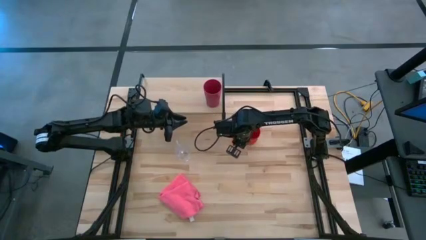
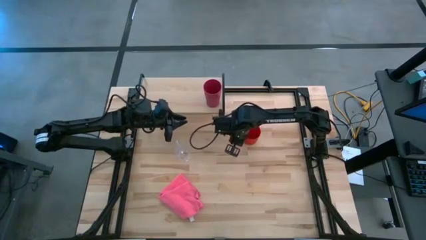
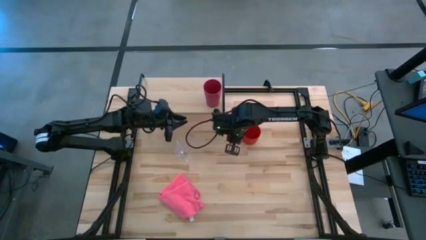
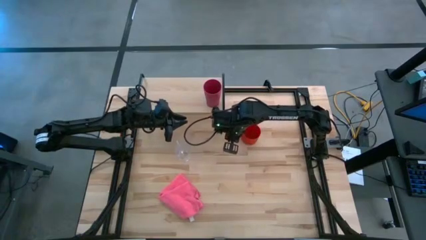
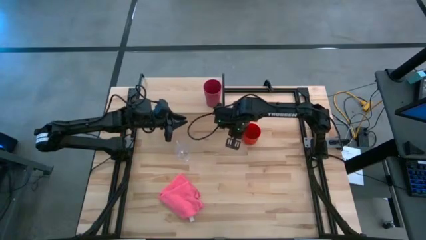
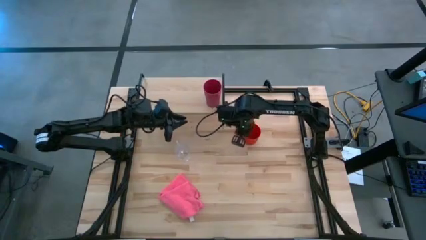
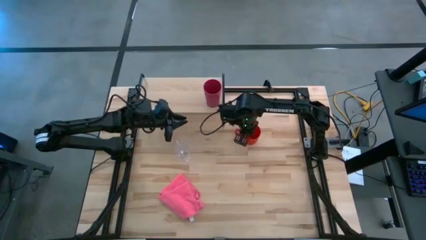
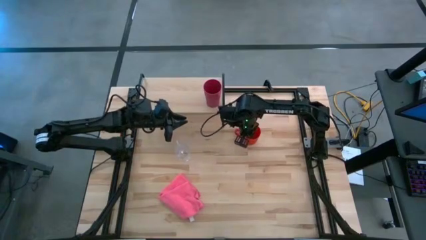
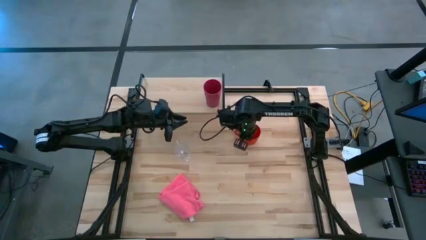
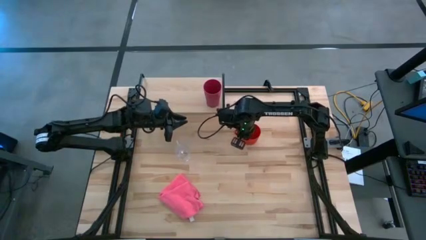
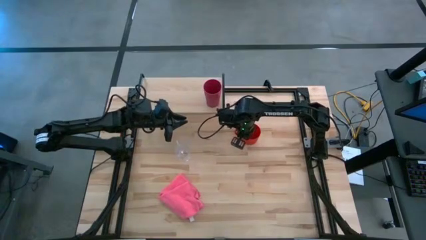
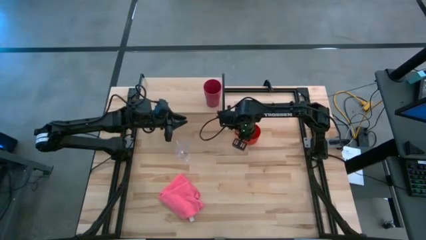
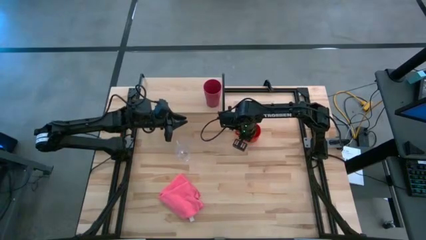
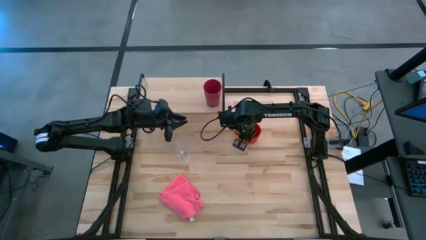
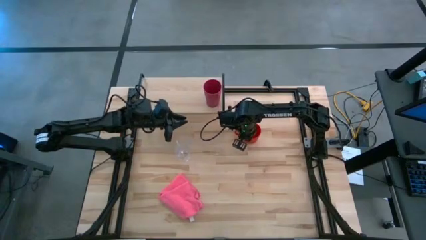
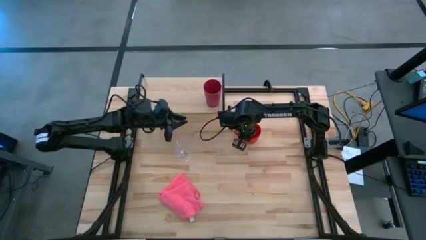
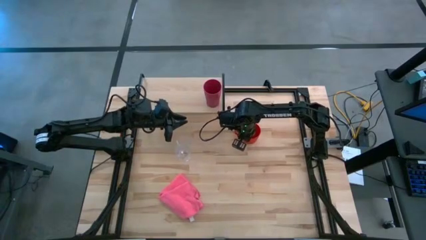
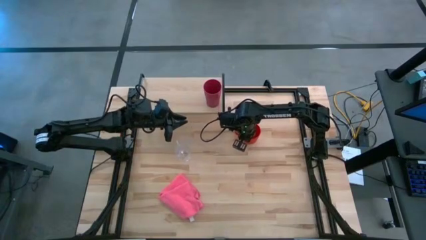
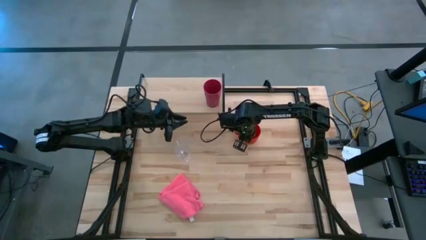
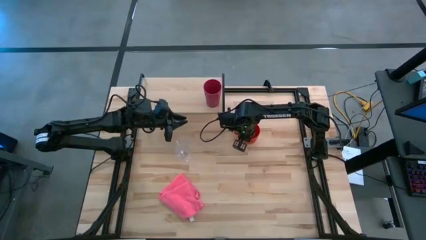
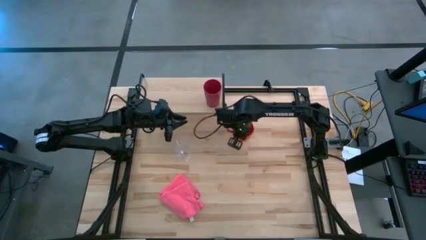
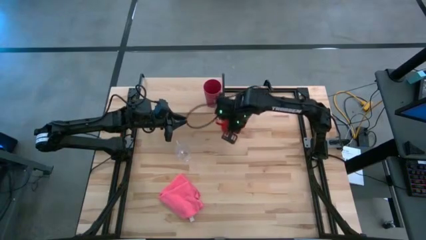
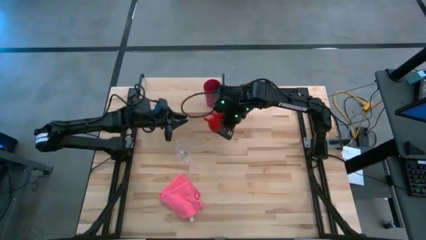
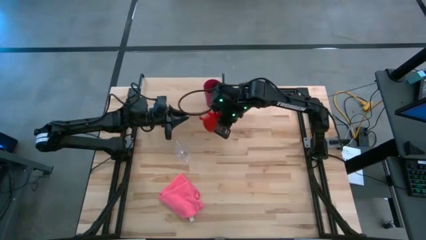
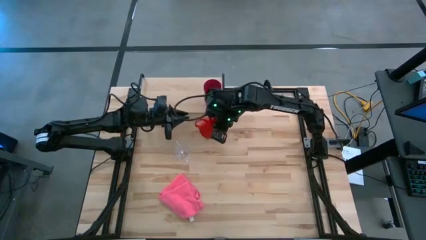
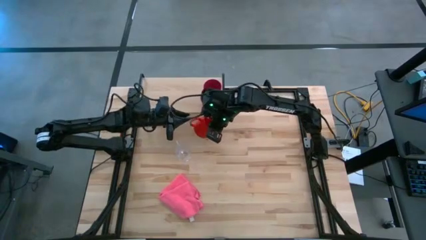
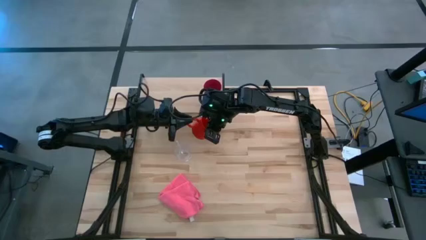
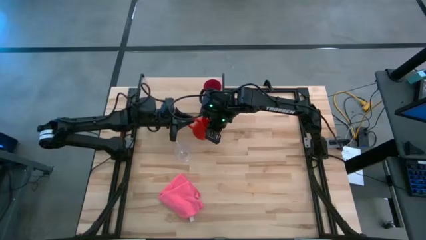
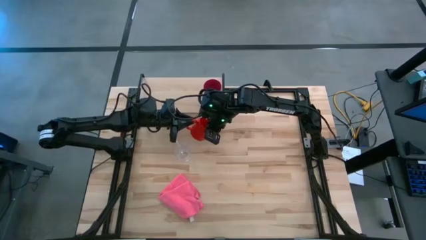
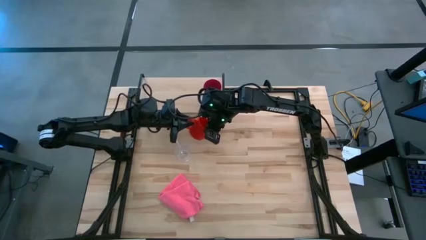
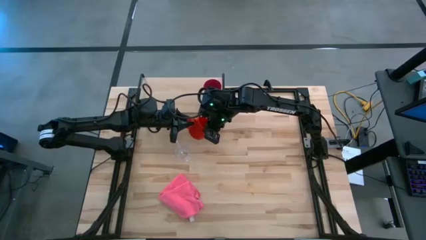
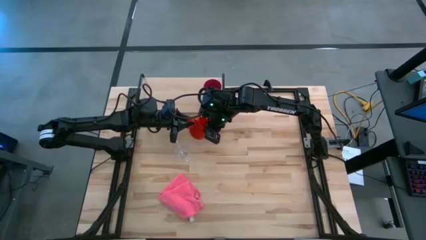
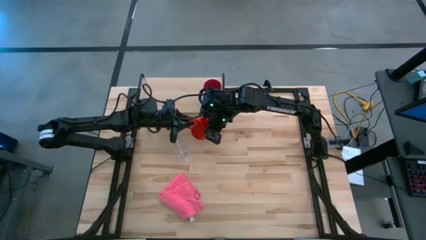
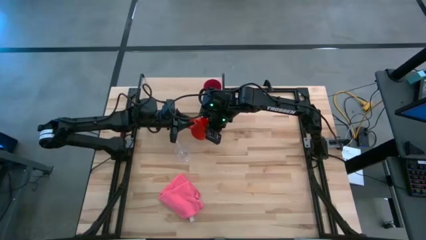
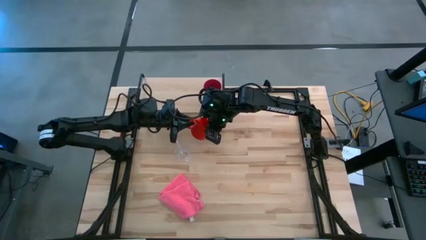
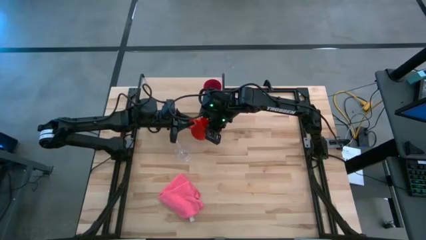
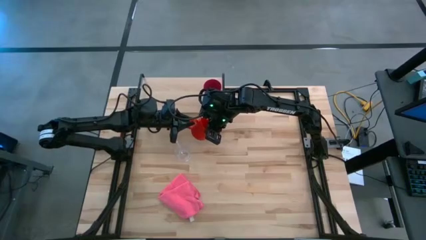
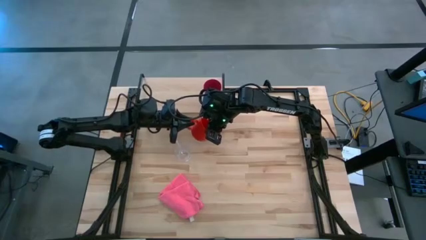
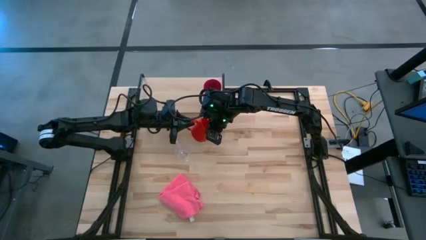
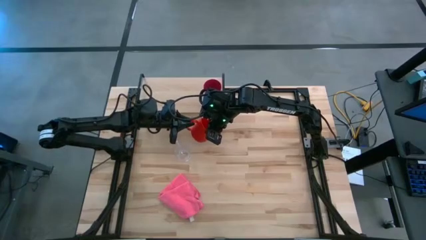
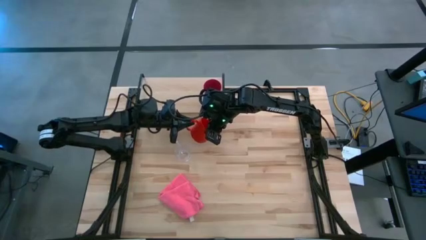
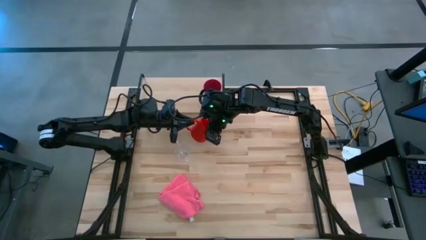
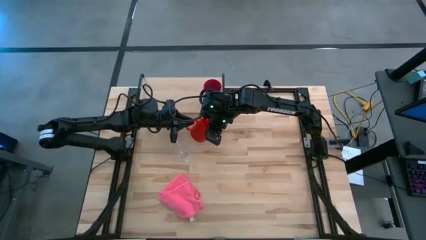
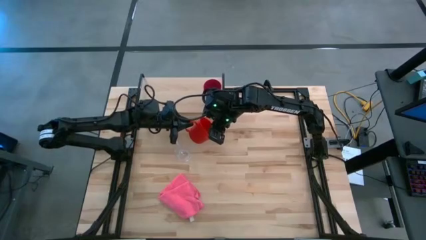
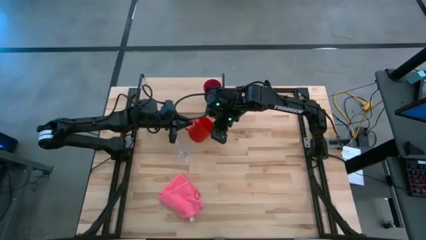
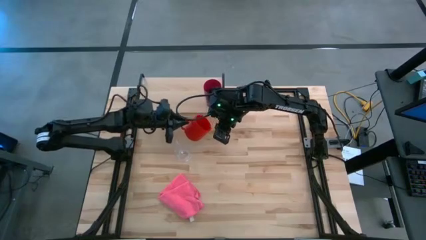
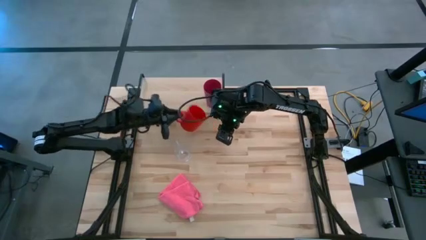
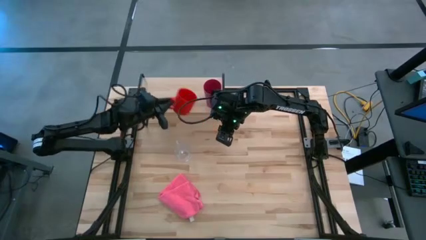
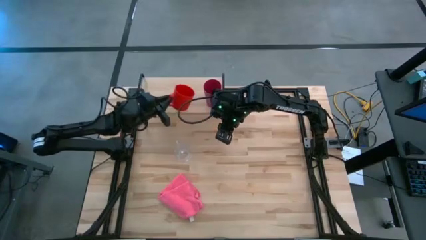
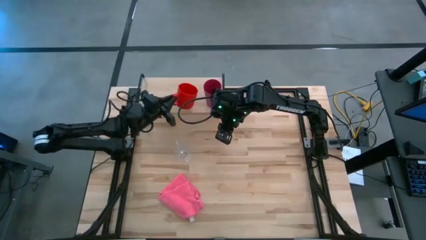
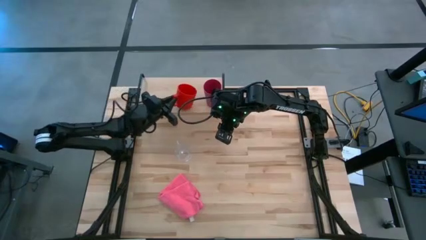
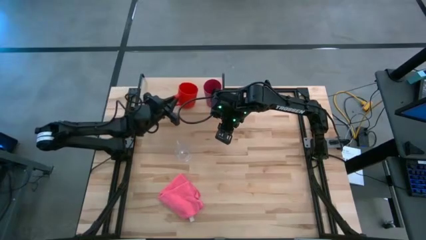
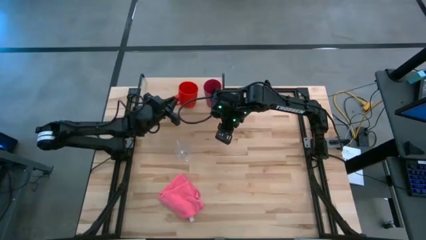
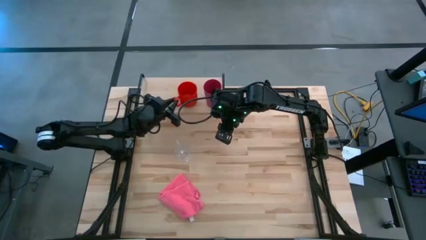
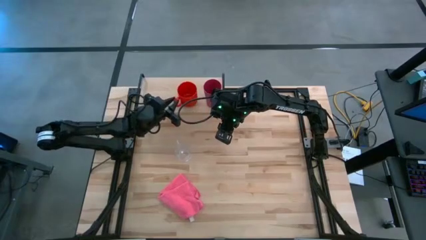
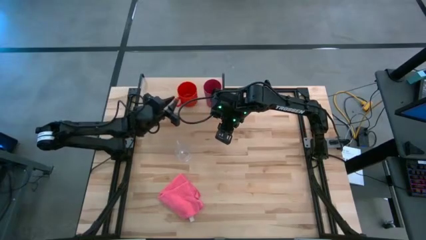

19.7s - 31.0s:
Task: Stack small to large cups/mugs on shelf
Put the orange mug on the shelf
